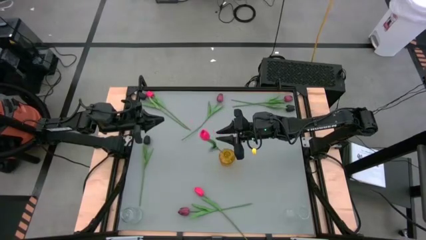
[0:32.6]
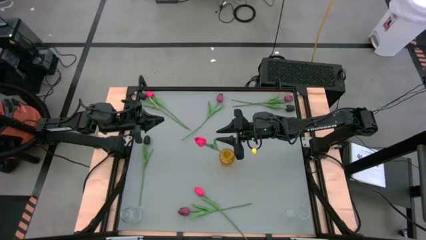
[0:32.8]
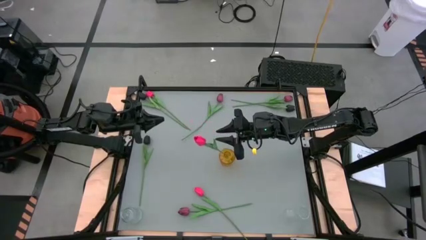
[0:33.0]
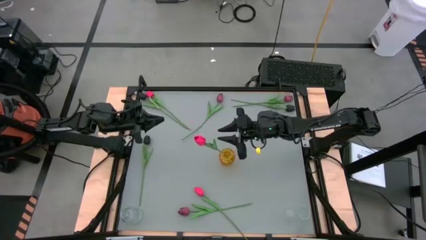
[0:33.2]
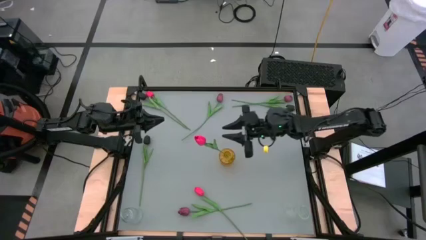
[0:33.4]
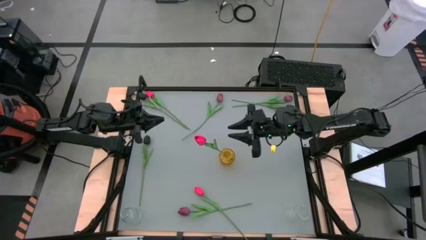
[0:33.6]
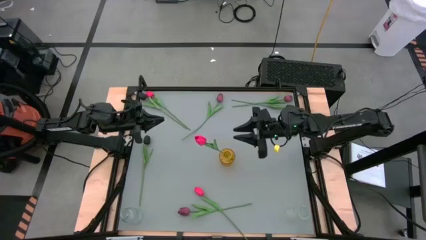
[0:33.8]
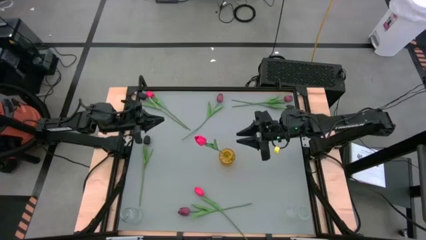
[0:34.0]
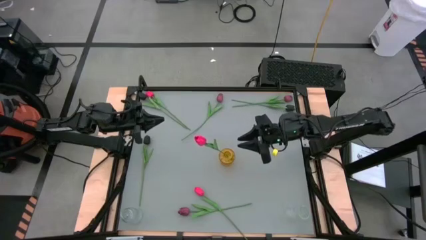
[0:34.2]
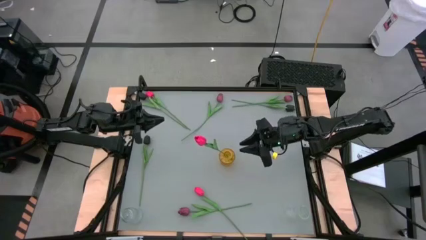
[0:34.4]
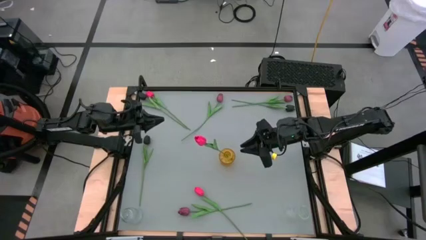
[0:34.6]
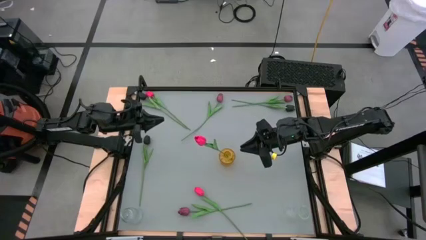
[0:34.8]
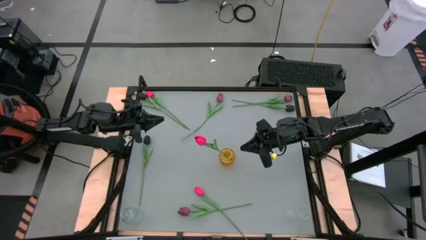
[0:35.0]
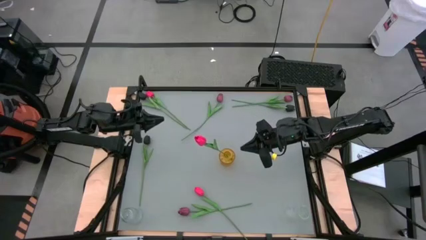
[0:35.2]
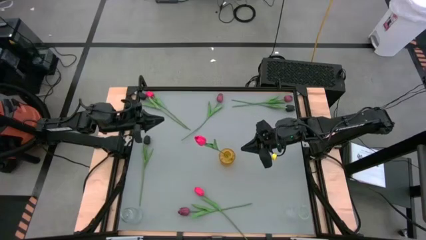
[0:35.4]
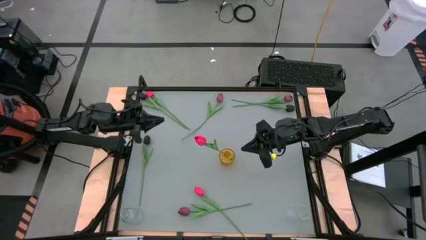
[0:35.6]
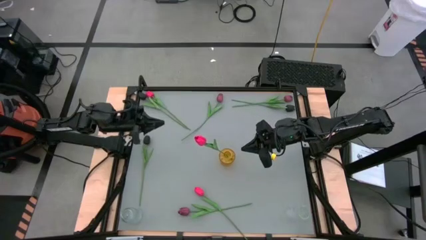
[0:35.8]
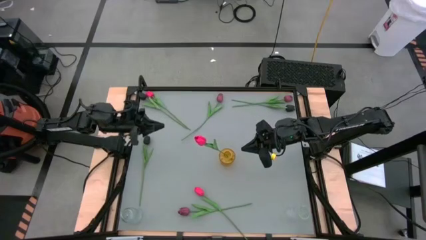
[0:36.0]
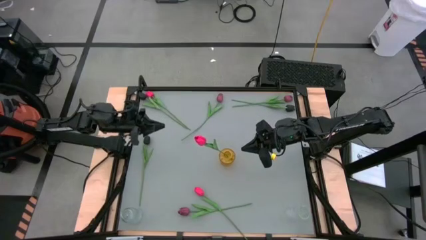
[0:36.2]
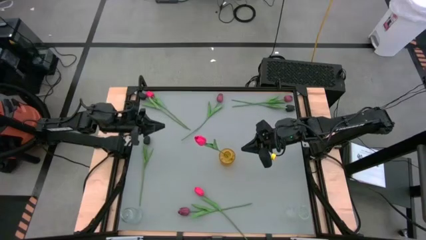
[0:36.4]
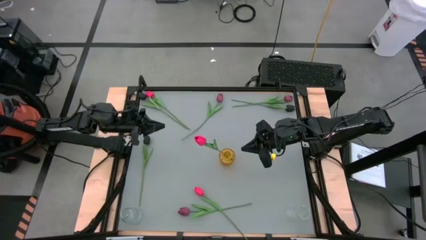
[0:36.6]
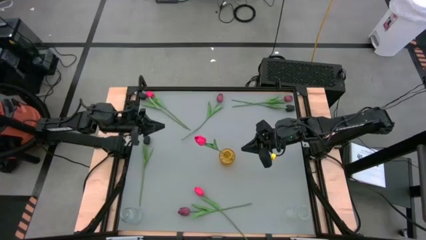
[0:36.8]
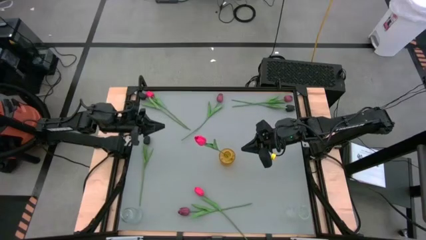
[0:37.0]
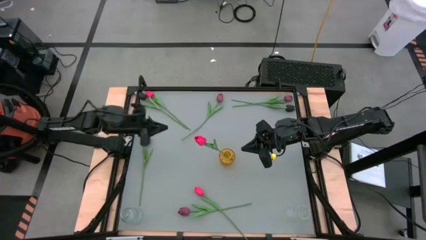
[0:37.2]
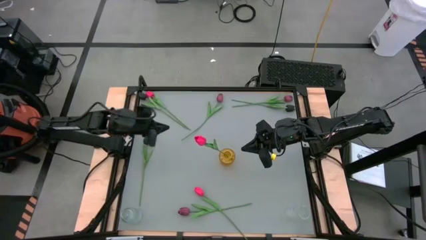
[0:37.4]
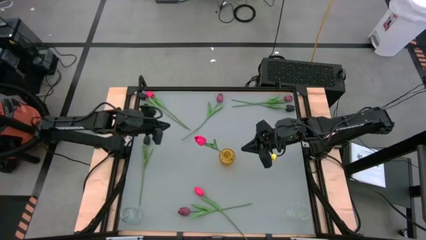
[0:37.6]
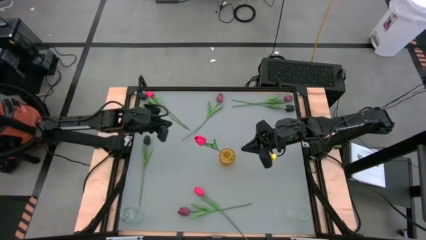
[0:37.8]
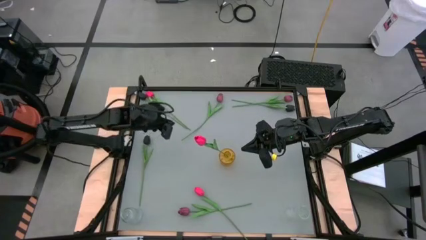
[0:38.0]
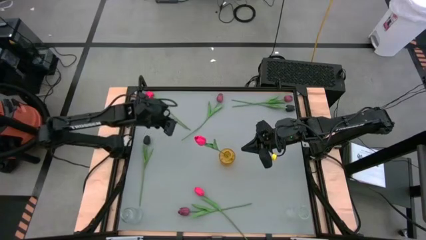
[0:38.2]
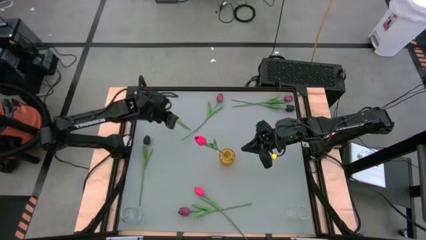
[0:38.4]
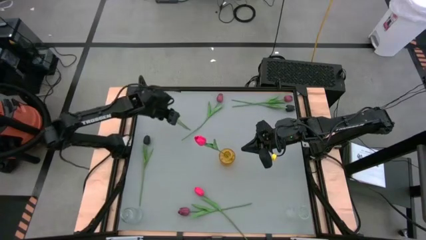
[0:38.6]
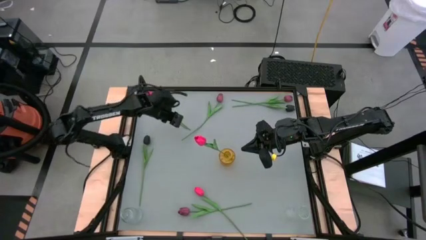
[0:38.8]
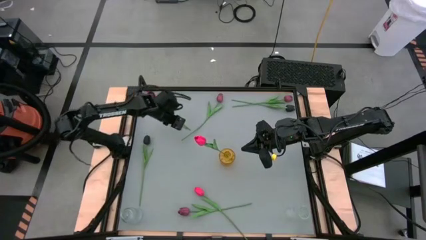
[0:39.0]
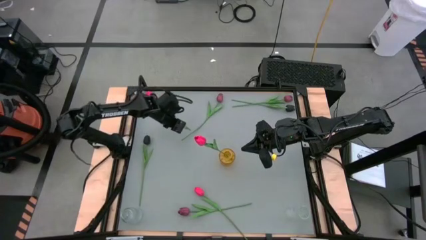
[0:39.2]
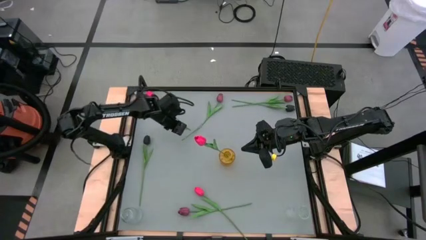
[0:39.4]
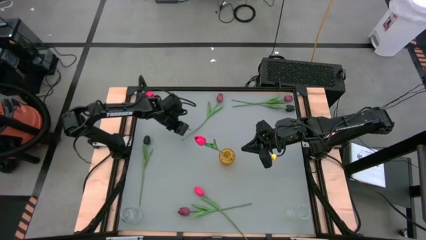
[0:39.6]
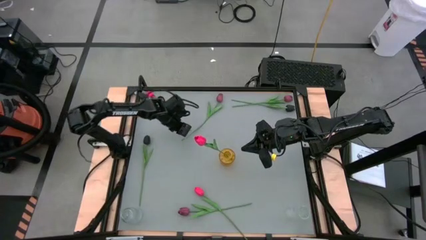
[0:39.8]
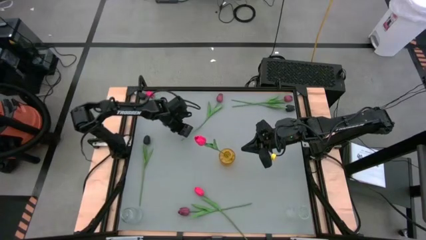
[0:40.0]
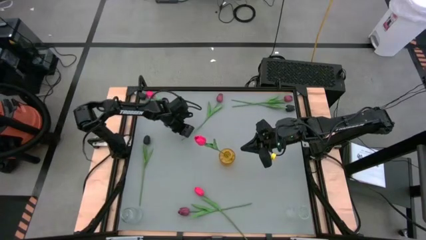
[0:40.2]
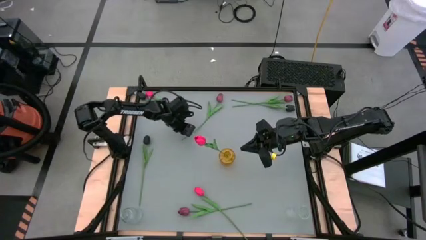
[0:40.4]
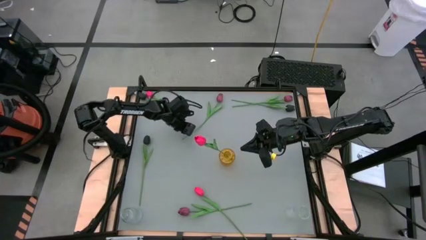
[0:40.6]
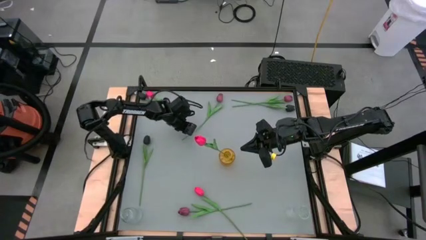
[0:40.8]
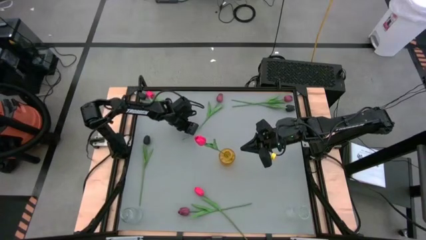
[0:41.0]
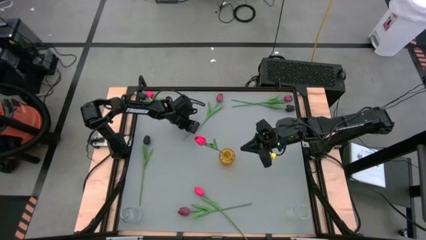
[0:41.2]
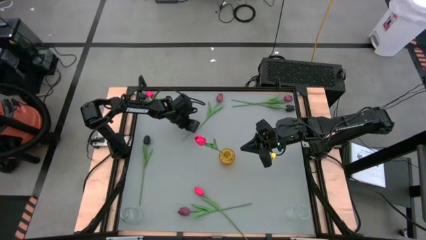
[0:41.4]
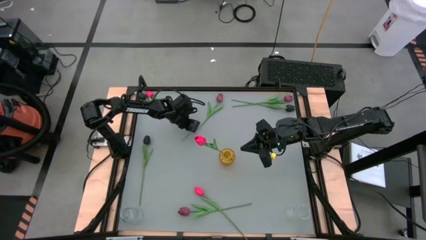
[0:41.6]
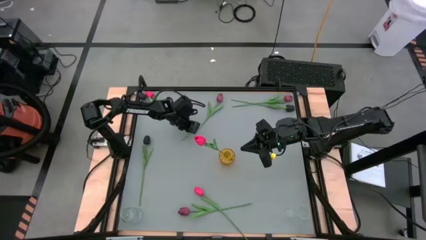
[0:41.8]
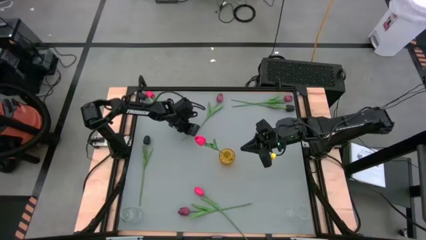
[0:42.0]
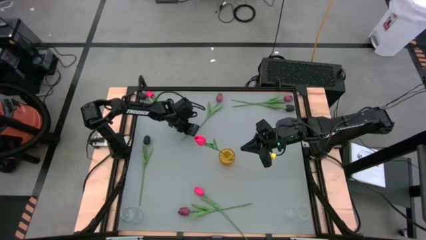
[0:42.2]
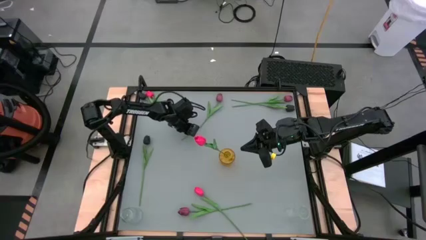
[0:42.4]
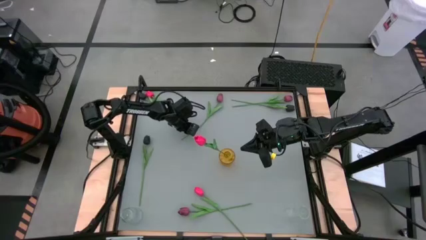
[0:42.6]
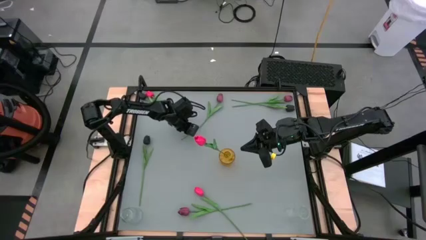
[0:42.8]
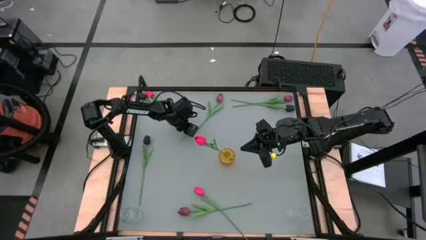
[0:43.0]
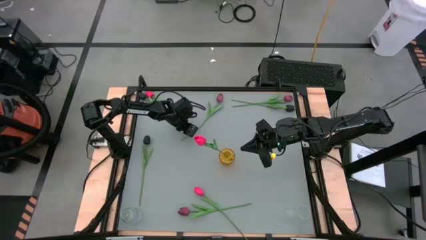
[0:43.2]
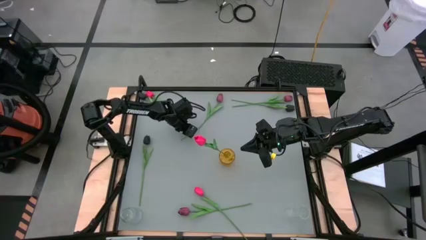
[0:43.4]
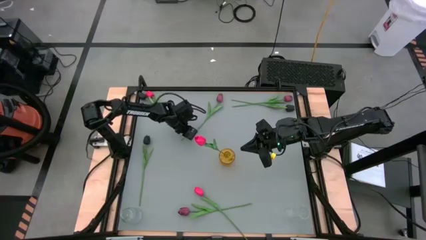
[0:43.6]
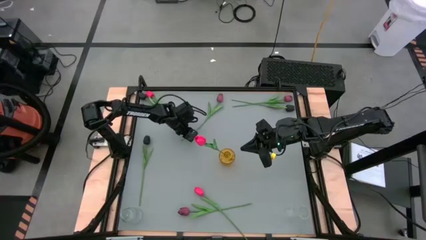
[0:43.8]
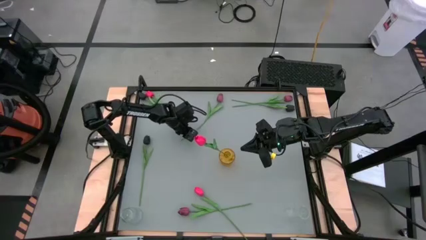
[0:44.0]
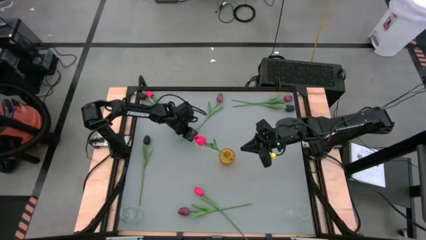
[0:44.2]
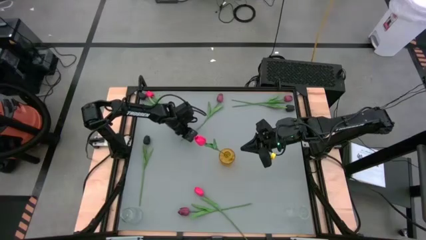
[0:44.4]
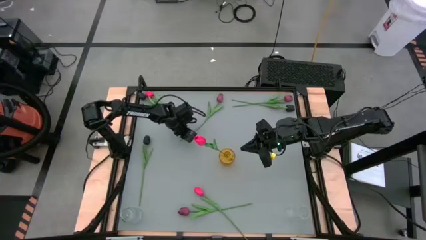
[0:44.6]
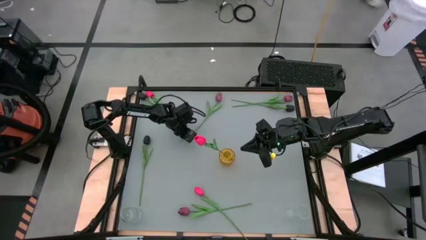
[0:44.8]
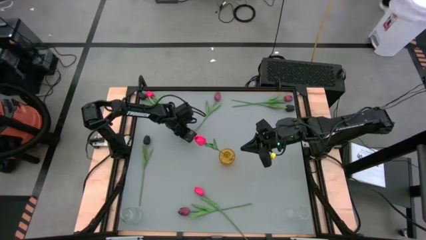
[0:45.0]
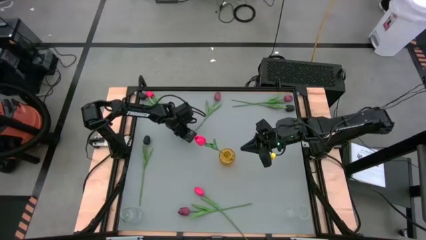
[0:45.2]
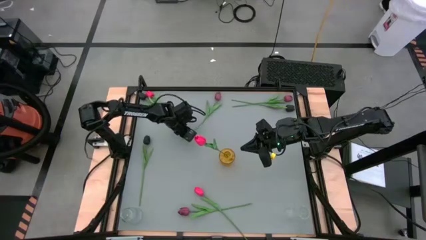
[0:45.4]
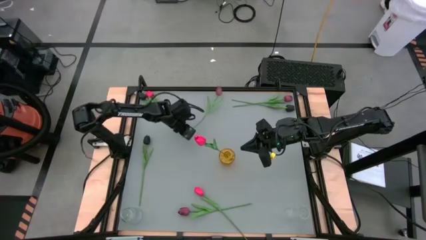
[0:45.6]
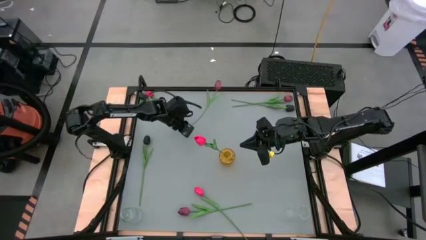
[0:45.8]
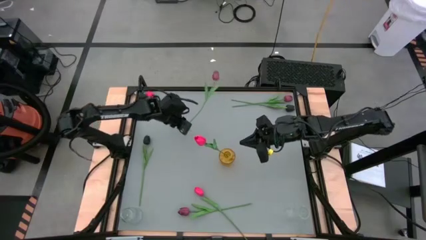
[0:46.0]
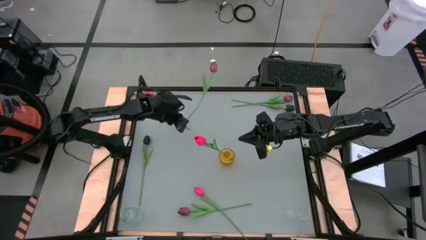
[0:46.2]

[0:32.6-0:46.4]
Task: Sort flowers into vase by color
Put the top left red flower into the yellow vase
